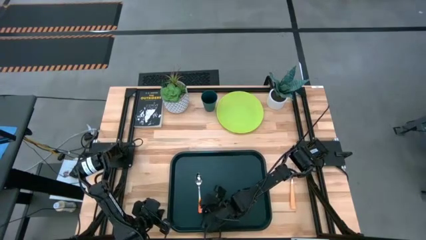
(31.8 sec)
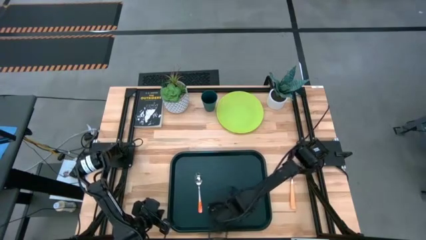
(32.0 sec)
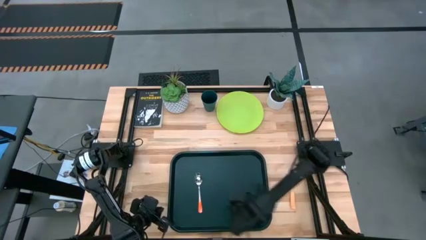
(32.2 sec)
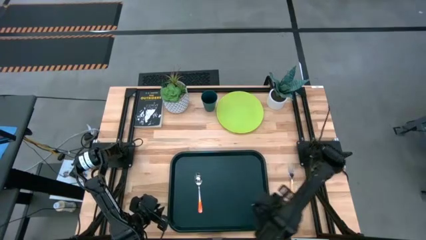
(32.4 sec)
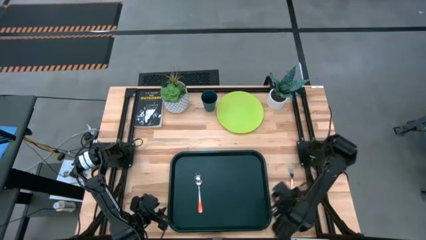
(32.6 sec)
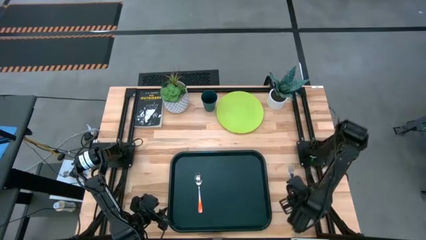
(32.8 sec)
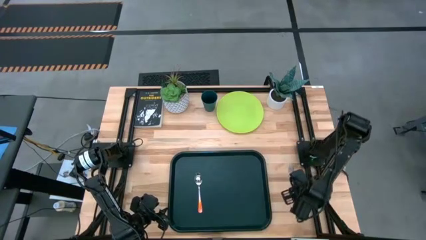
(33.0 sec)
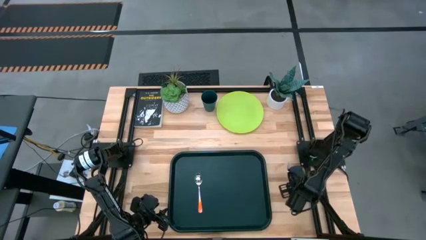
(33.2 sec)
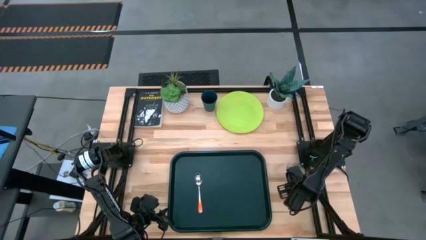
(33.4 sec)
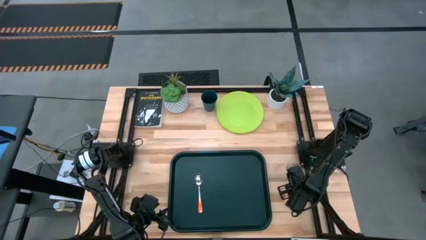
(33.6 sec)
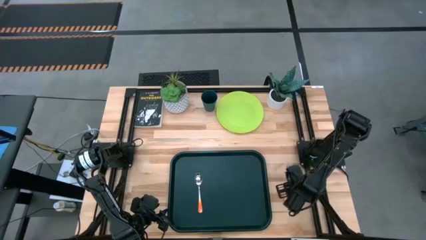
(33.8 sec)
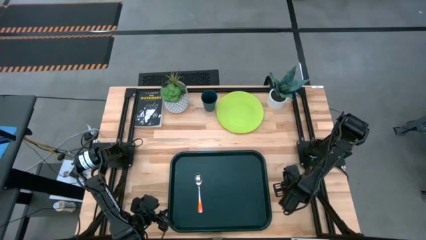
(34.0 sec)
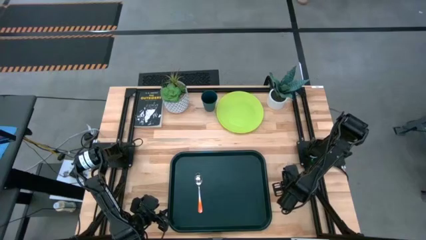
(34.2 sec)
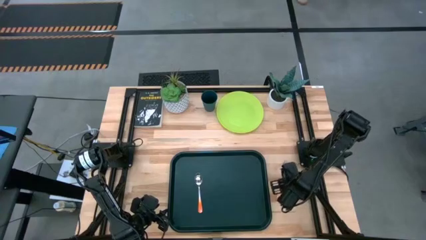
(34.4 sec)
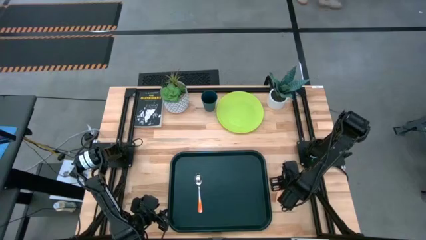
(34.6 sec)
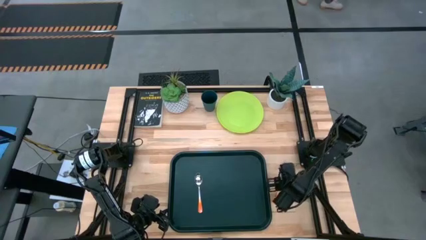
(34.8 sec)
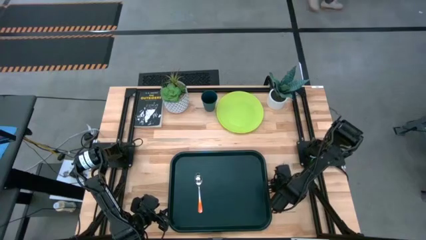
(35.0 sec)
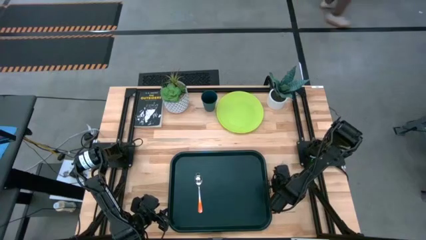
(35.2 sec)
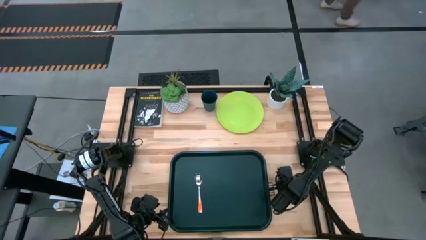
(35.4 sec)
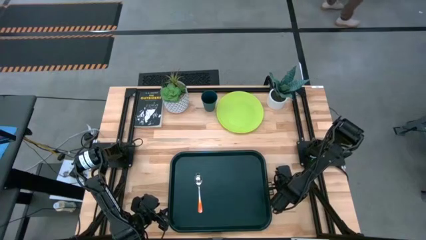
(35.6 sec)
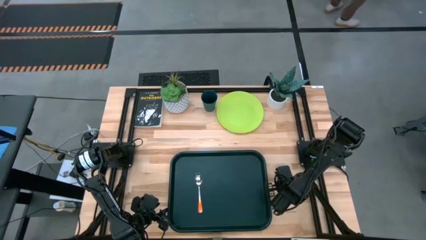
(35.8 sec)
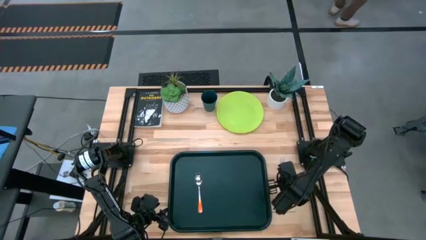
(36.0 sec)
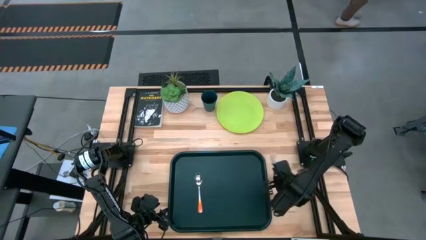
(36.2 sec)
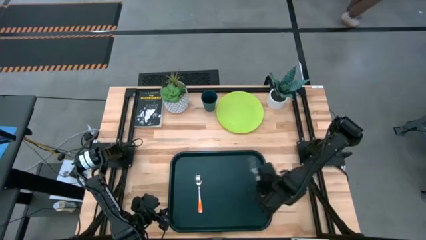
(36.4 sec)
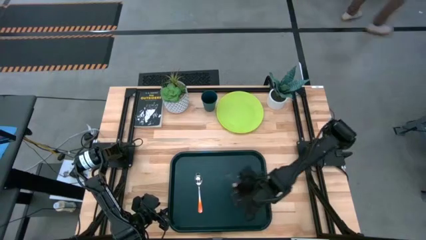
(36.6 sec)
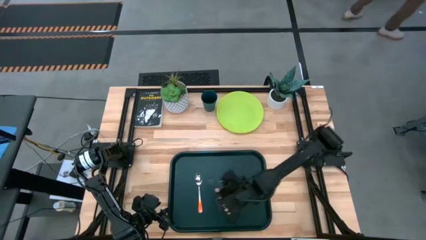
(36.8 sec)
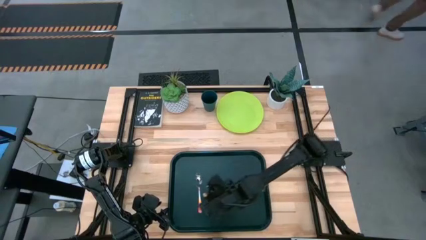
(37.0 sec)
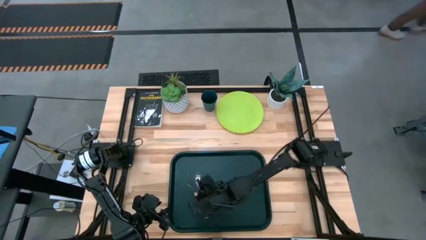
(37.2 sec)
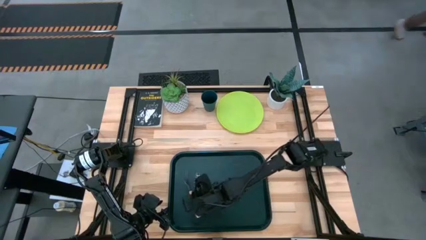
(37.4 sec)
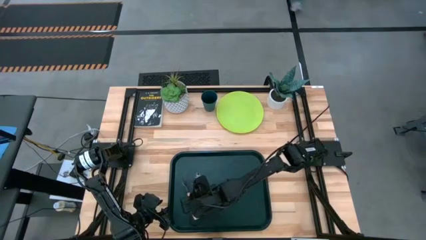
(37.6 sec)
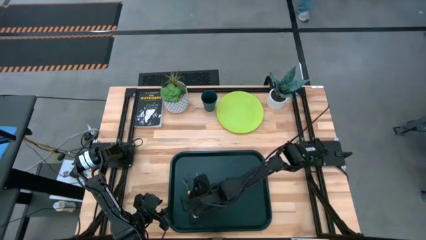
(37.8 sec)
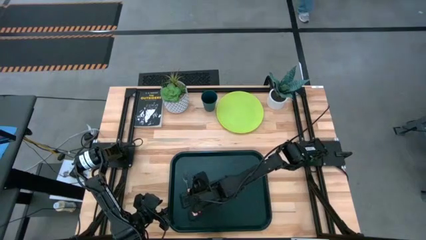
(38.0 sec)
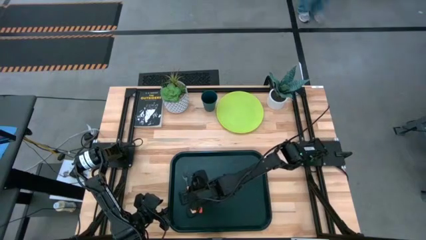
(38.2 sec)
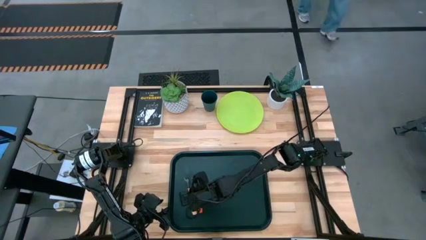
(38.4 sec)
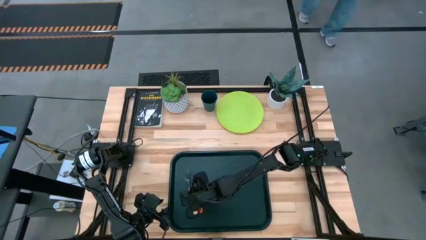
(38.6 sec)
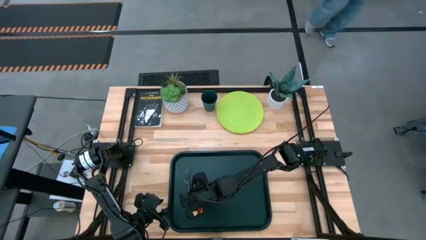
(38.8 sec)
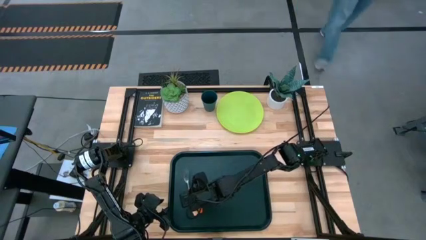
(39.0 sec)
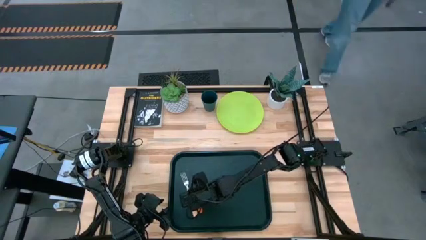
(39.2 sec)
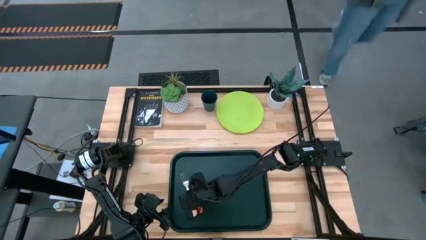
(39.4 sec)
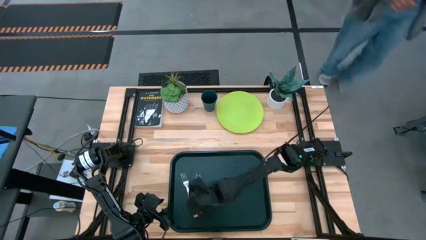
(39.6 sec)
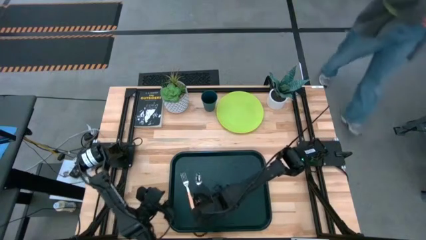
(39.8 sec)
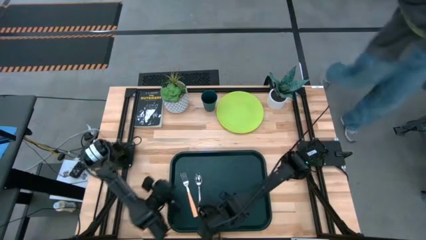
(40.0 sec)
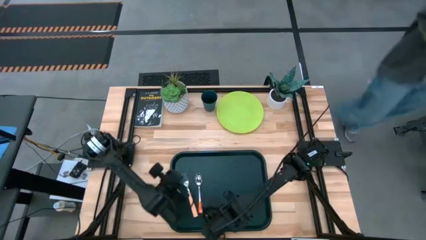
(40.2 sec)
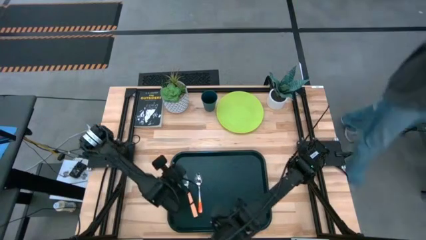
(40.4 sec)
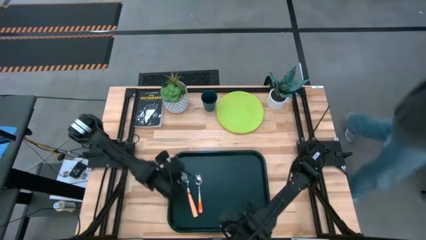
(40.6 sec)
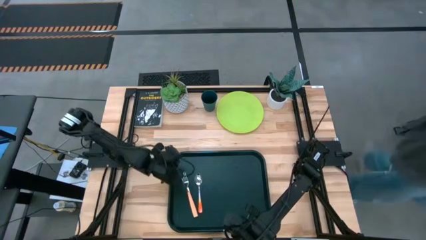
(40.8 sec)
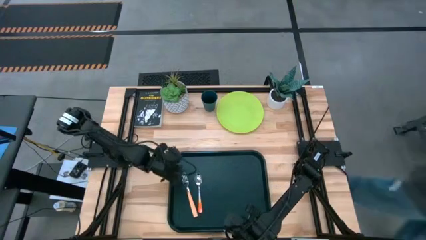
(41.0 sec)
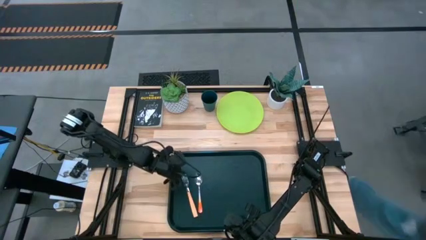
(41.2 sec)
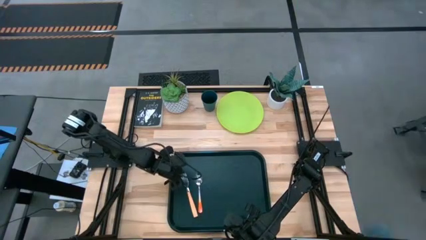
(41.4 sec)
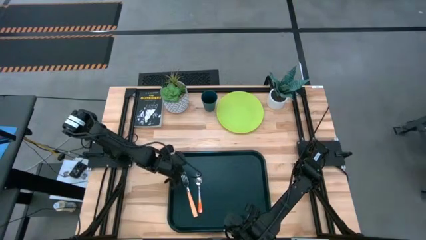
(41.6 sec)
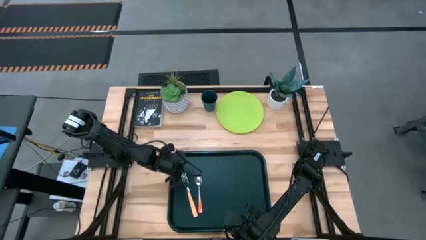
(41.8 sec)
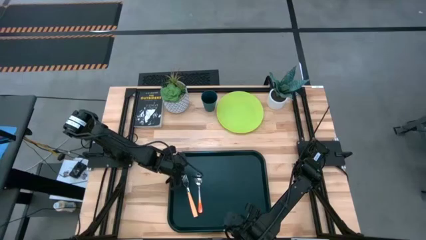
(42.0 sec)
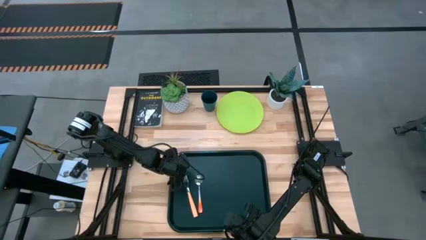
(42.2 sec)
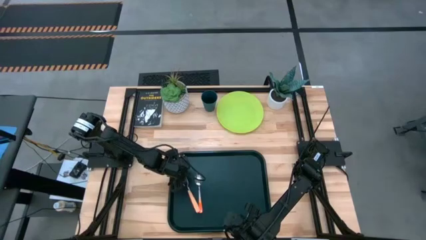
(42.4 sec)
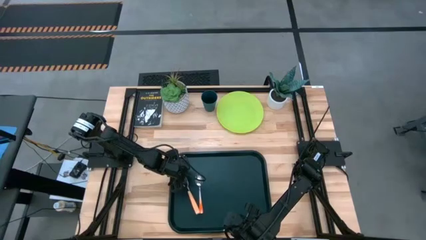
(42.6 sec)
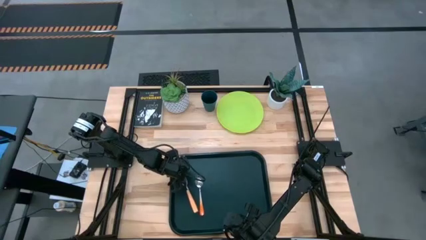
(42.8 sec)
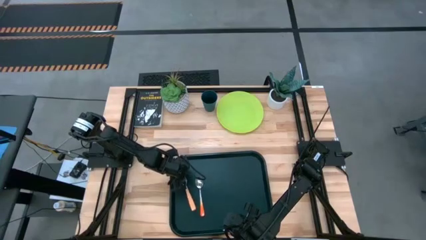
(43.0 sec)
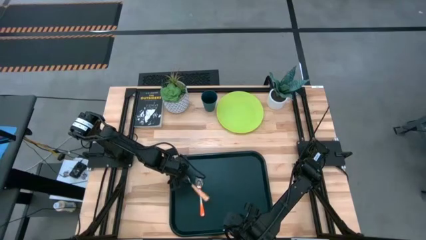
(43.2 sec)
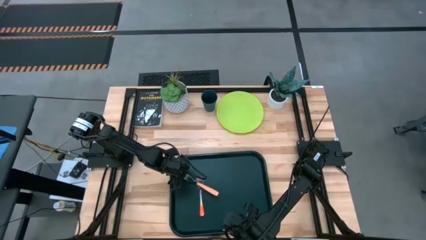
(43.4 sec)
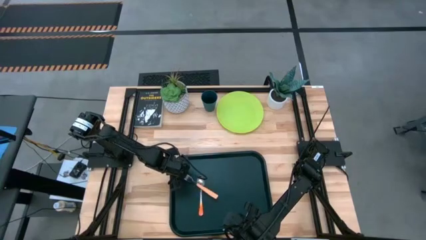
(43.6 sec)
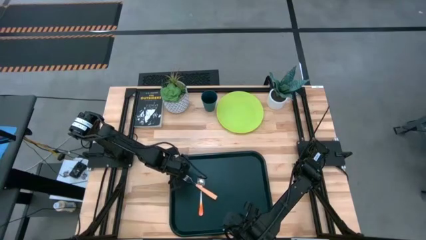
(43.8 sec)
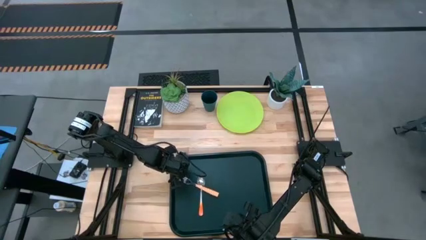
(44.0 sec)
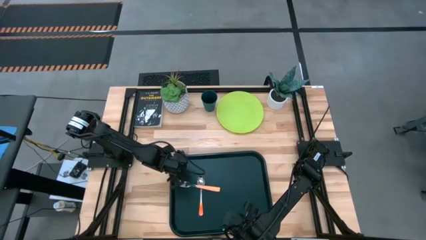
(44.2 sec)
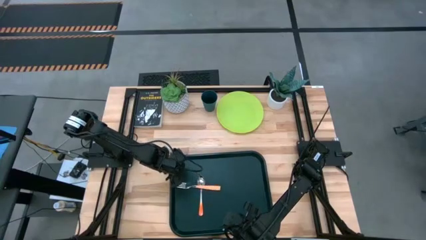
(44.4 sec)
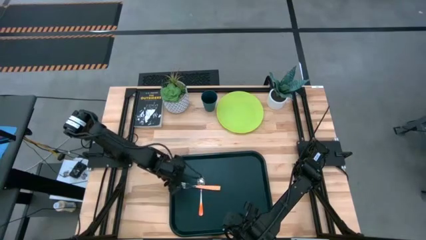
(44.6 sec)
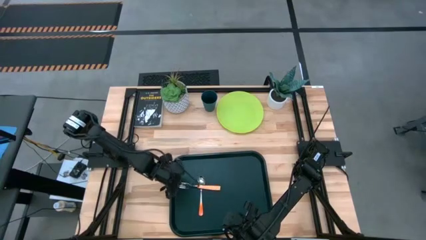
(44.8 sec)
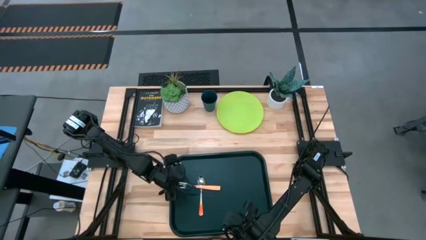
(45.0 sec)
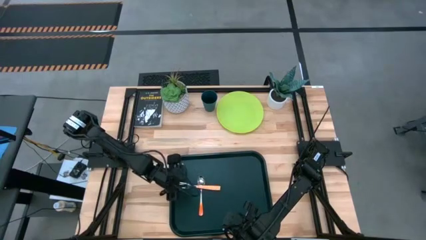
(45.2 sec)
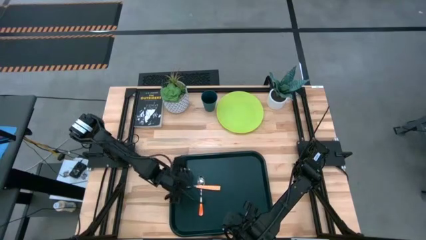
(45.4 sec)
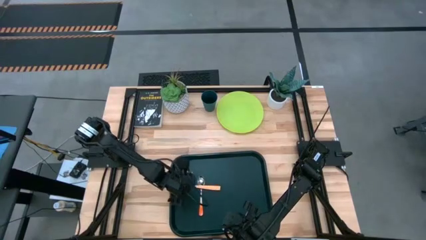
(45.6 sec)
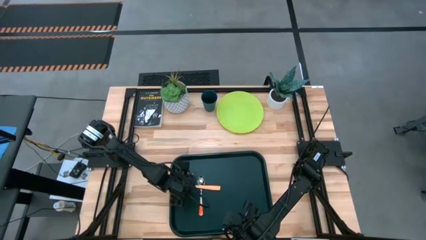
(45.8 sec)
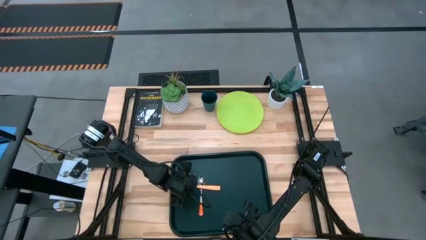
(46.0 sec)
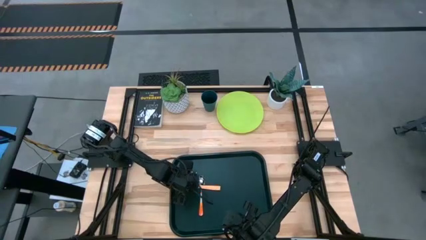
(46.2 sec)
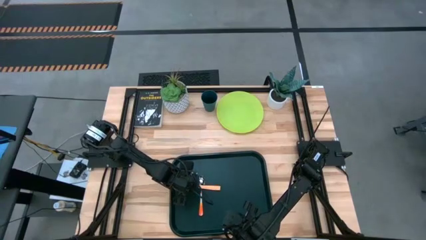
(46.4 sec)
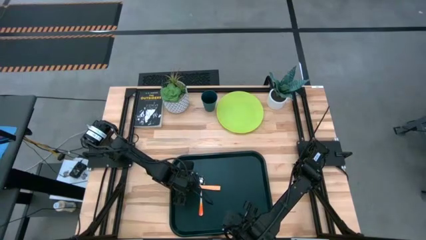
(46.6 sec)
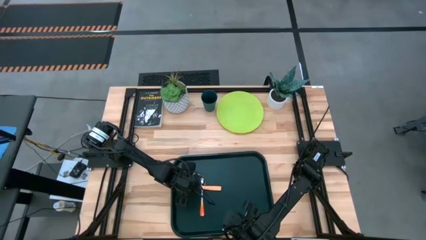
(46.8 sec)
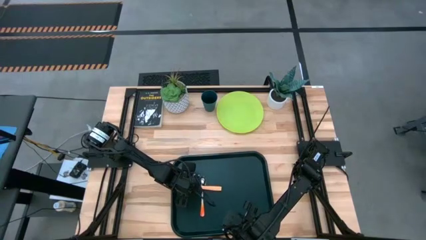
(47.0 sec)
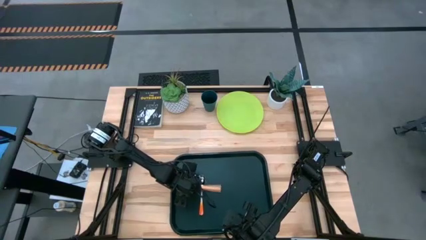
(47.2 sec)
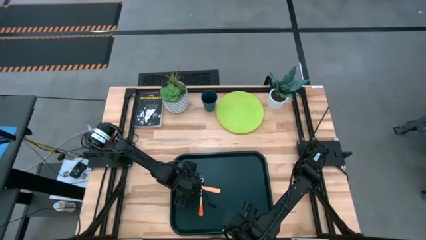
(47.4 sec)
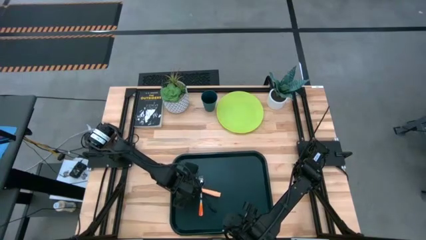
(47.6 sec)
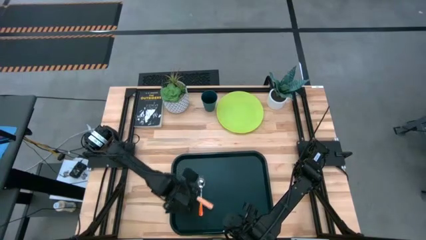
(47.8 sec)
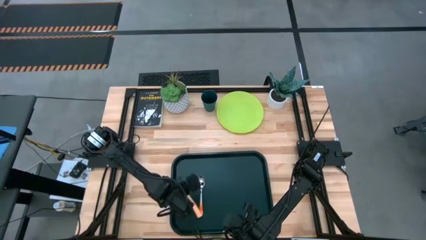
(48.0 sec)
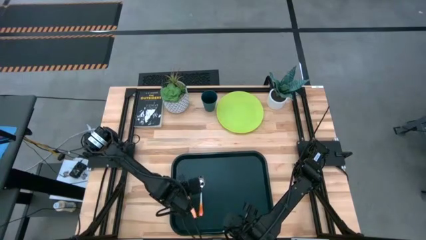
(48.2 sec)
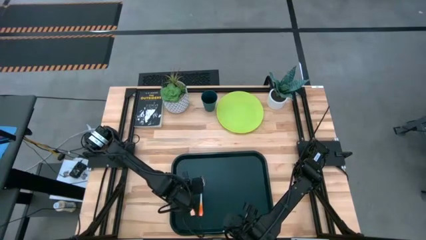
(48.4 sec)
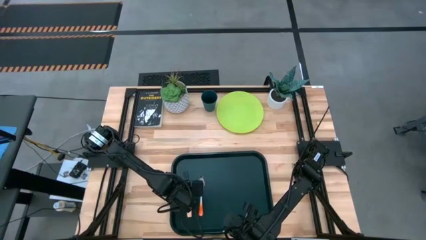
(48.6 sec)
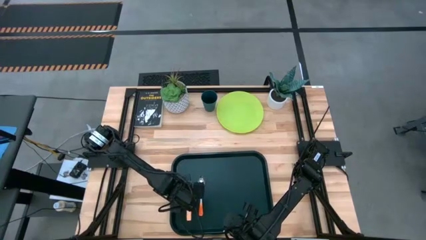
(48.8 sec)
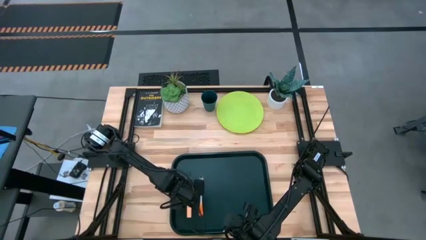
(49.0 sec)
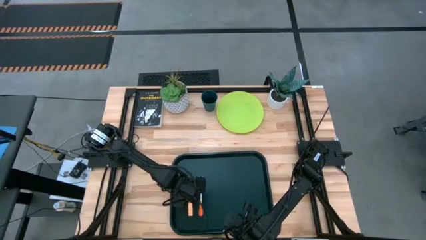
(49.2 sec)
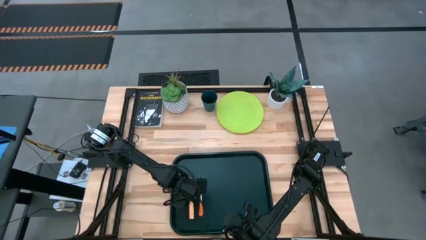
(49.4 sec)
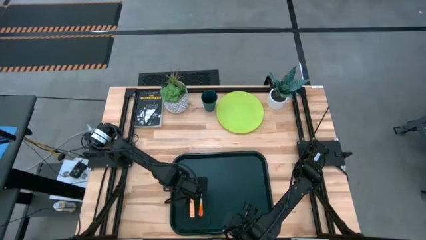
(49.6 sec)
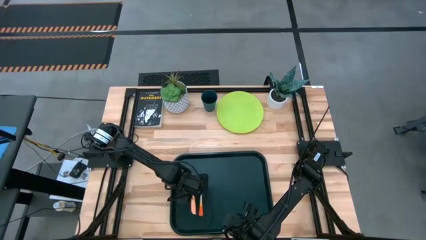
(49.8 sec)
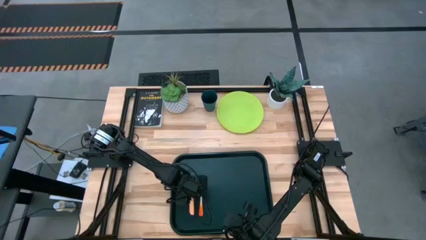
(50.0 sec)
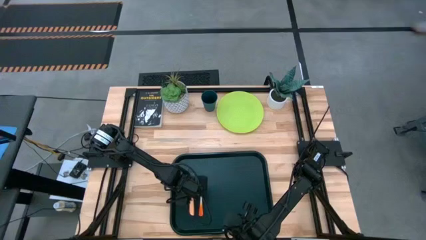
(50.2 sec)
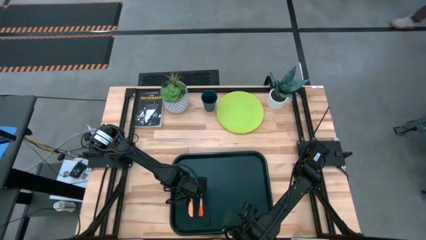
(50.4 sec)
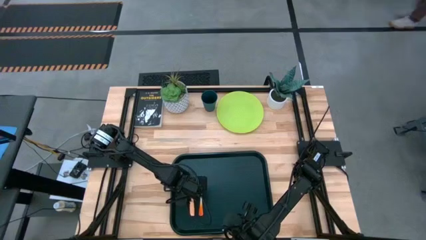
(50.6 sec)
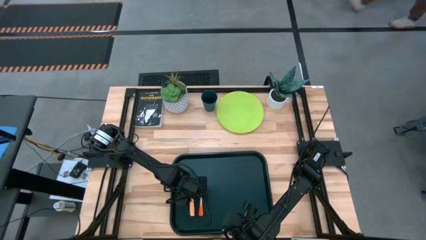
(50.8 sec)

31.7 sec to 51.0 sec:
Task: Pick and place plate/cup/fork/spoon on tray
Put the light orange fork to the left of the orange spoon on the black serving tray
